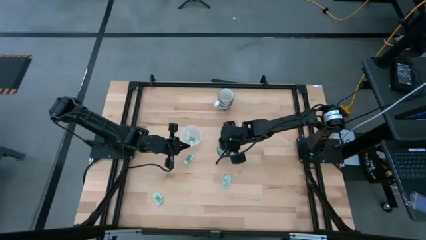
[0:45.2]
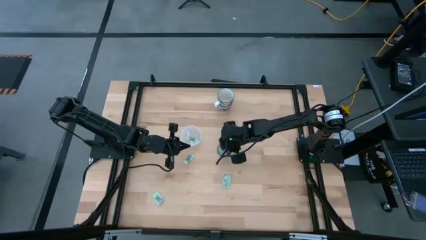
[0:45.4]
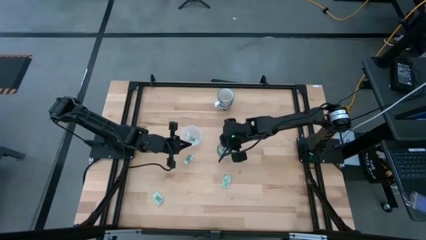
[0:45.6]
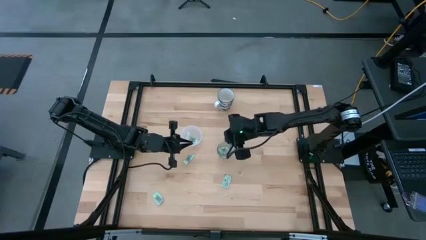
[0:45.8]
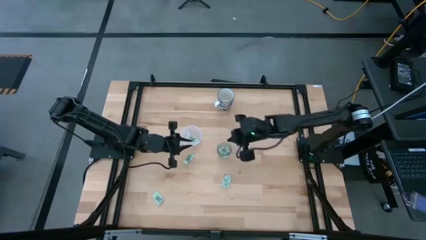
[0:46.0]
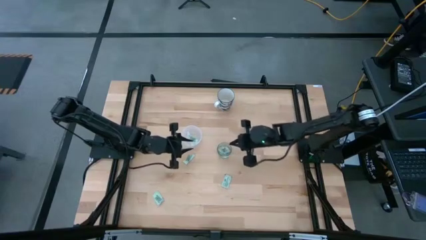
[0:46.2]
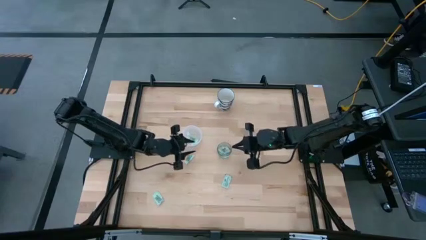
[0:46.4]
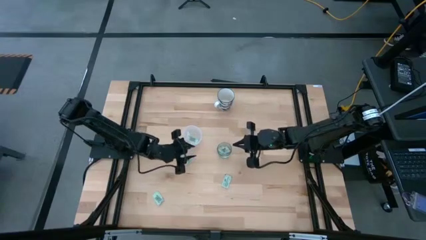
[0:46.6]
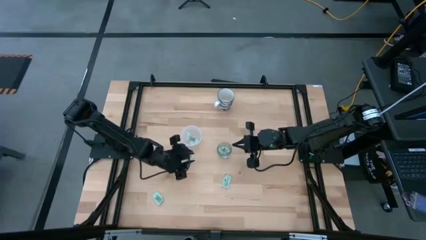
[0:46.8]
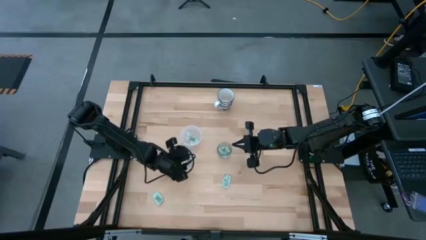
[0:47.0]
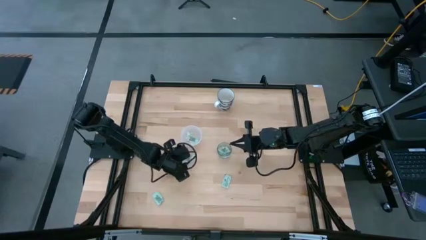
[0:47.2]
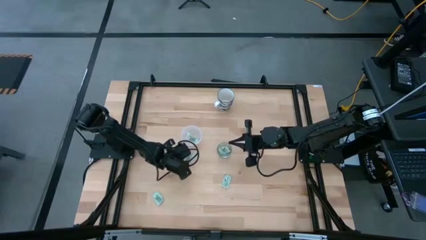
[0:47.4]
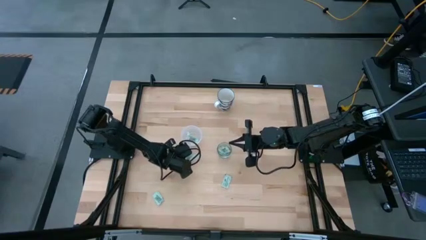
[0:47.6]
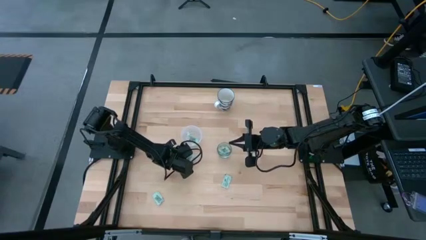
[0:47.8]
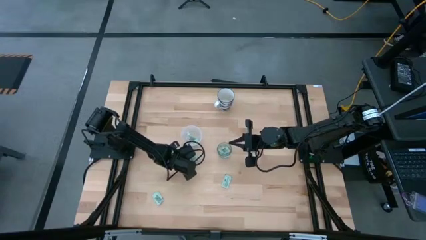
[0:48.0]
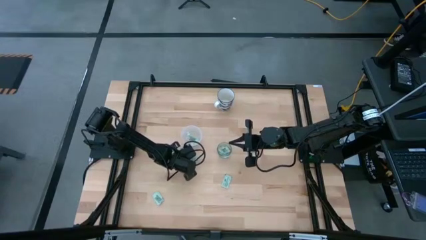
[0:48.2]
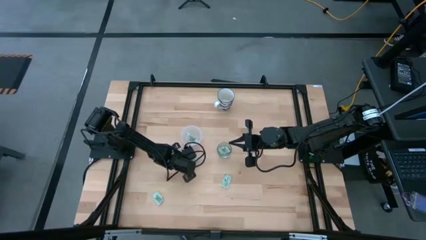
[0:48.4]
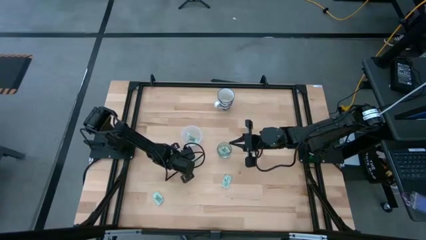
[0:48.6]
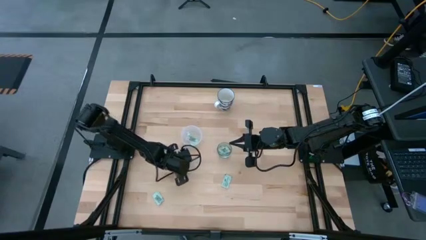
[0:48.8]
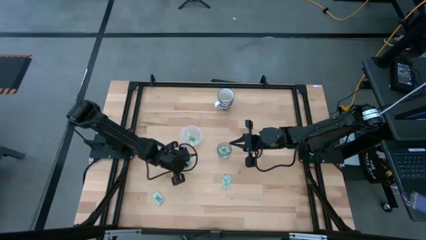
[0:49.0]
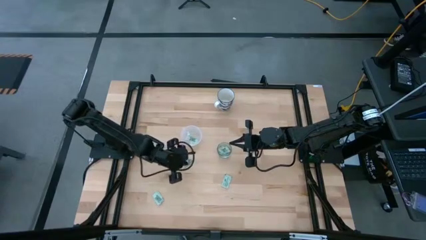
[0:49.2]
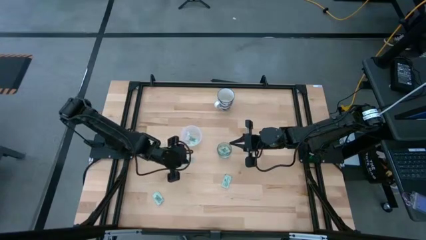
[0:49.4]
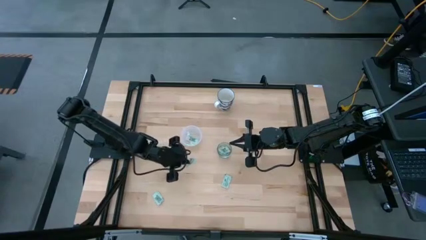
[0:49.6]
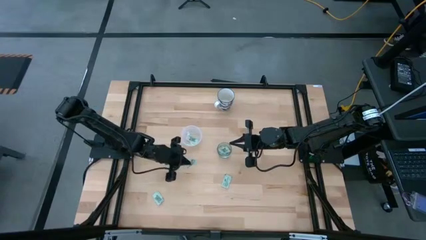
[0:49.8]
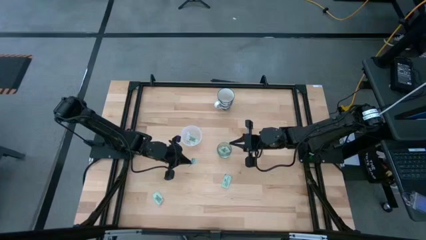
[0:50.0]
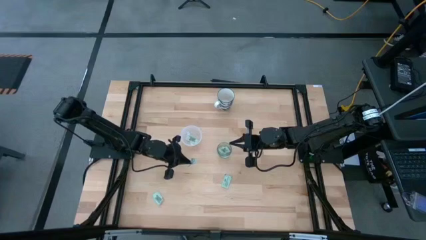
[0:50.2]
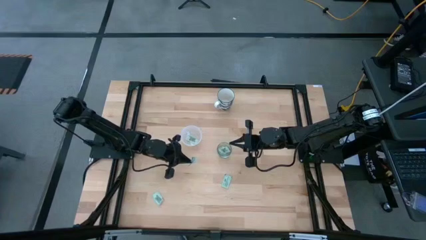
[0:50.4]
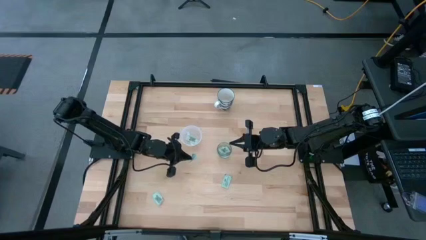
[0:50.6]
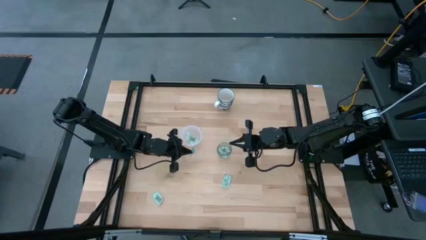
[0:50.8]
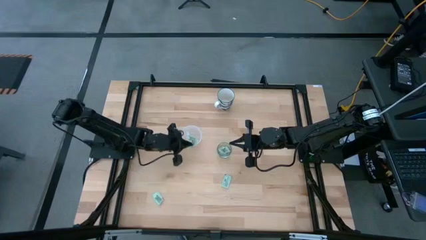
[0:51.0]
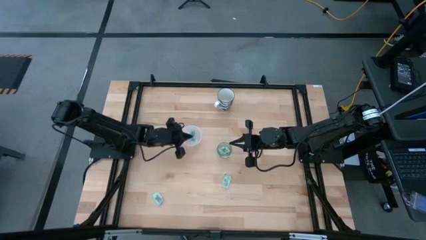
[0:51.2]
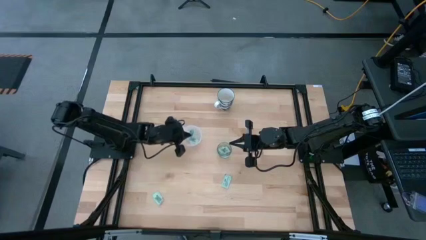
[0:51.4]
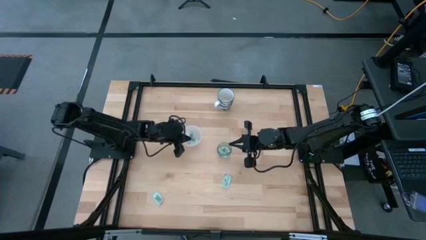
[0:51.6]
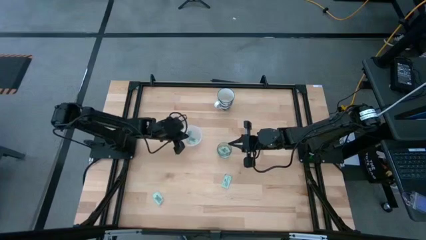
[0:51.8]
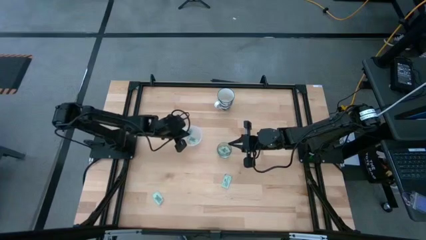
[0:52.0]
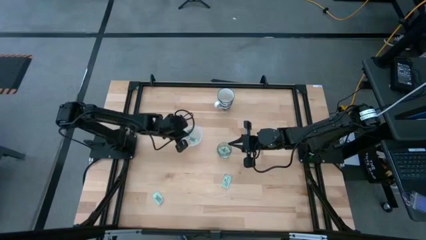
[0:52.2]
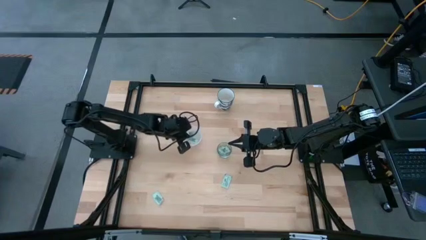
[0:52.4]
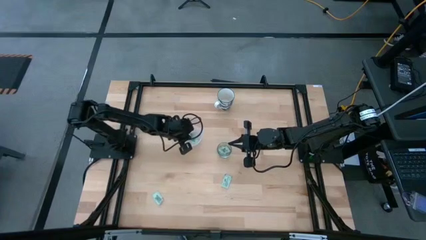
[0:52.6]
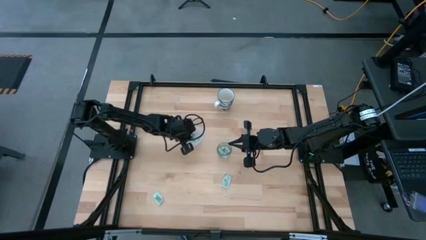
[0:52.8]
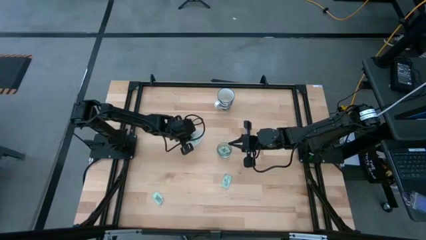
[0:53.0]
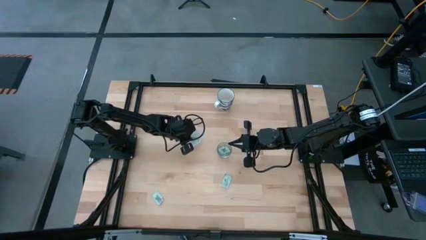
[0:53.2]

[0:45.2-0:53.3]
Task: Pick and place Stevia / Truvia into bins
Put the stevia packet into the plastic container

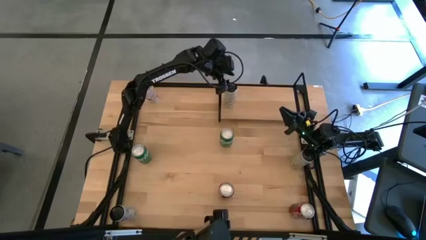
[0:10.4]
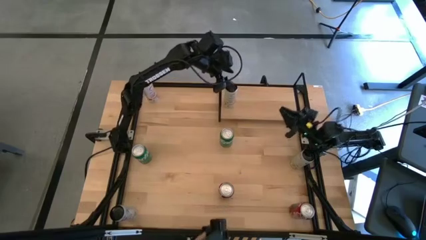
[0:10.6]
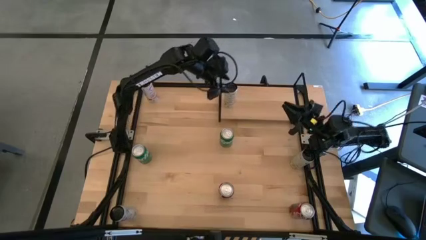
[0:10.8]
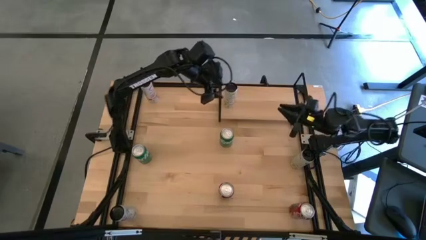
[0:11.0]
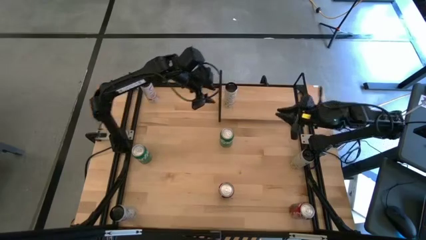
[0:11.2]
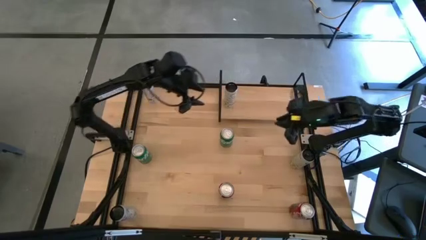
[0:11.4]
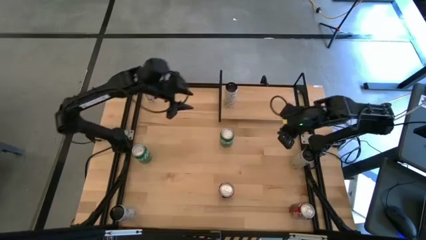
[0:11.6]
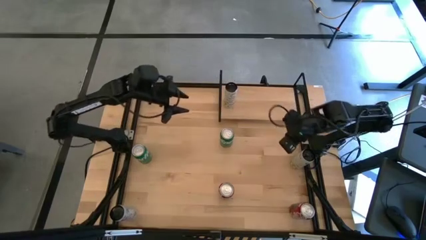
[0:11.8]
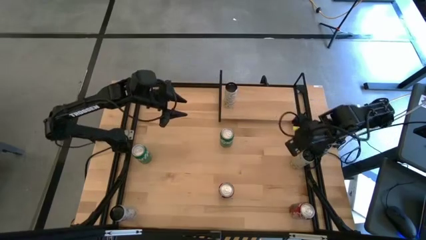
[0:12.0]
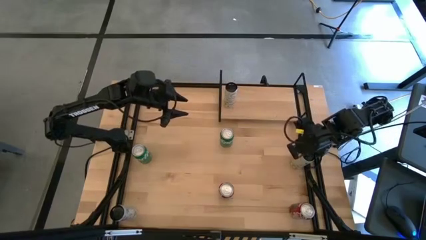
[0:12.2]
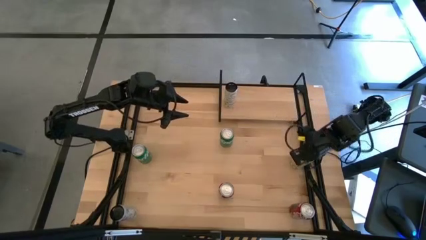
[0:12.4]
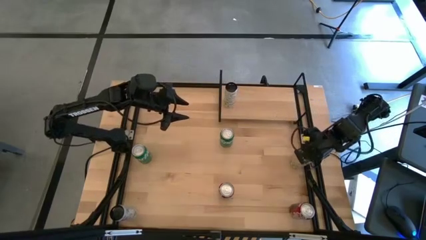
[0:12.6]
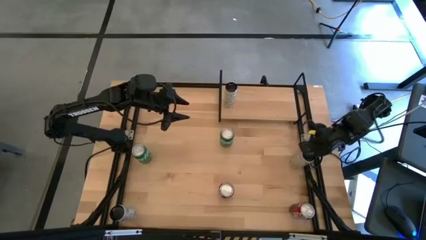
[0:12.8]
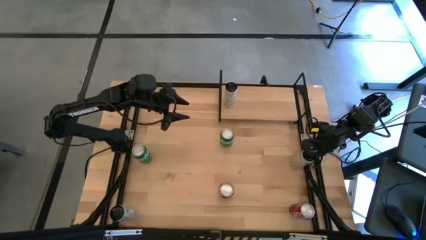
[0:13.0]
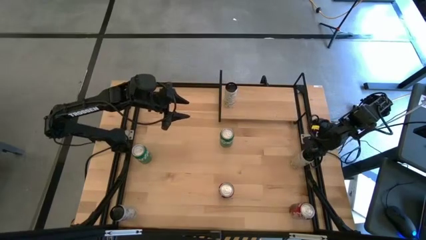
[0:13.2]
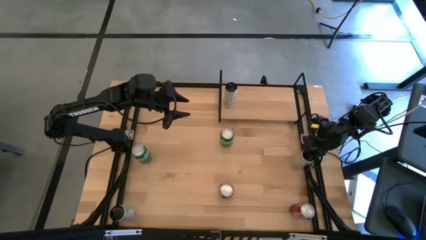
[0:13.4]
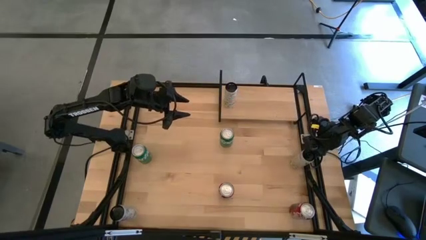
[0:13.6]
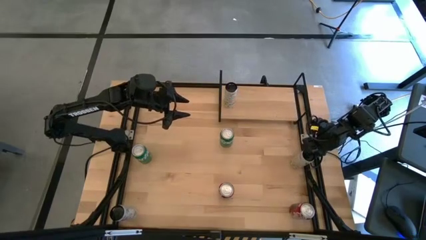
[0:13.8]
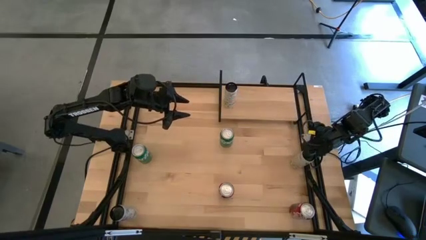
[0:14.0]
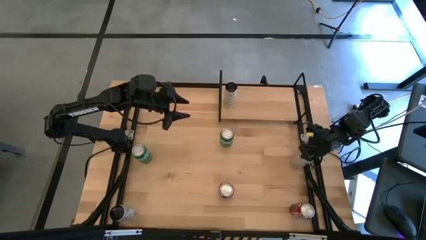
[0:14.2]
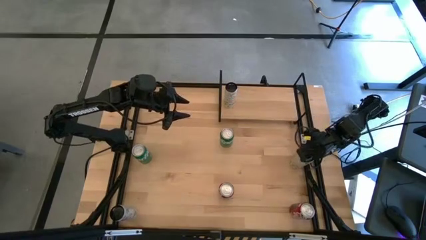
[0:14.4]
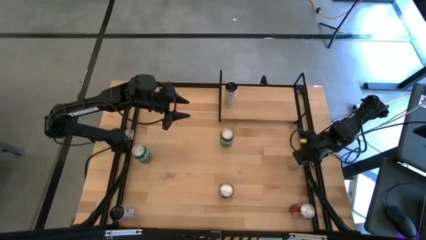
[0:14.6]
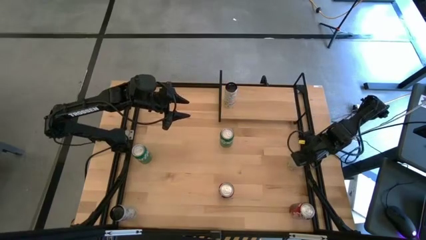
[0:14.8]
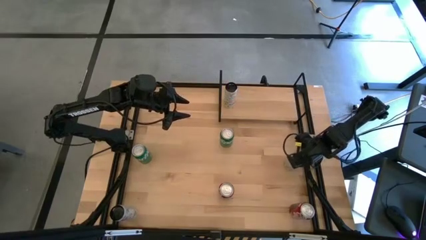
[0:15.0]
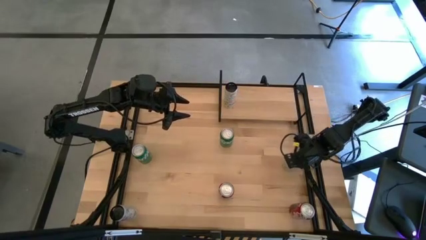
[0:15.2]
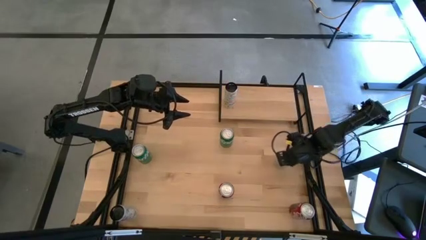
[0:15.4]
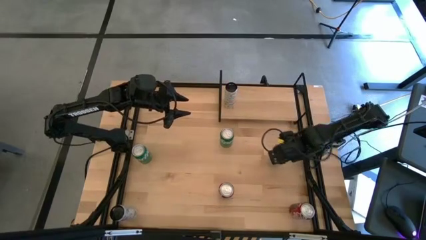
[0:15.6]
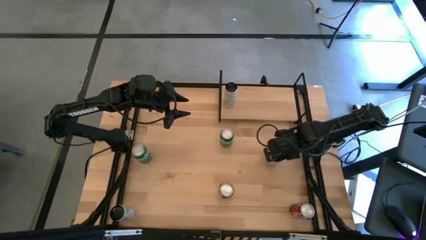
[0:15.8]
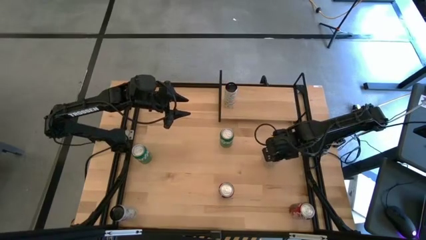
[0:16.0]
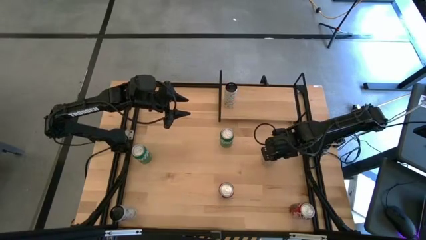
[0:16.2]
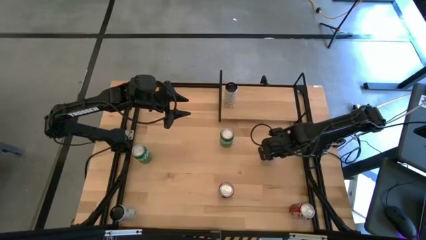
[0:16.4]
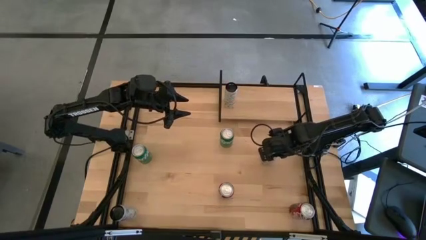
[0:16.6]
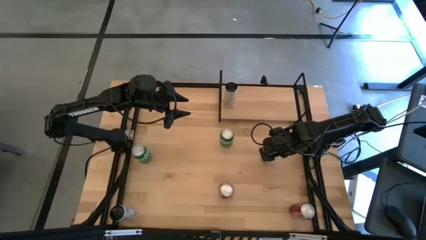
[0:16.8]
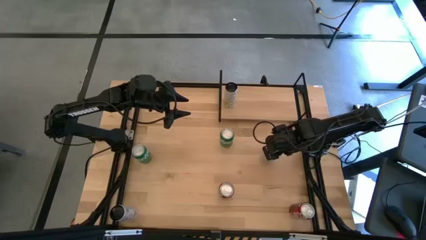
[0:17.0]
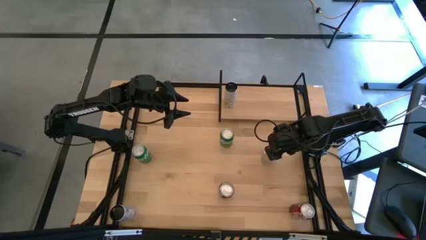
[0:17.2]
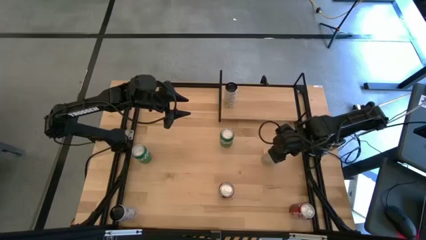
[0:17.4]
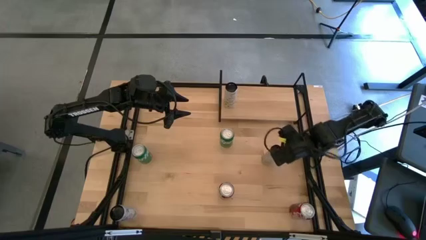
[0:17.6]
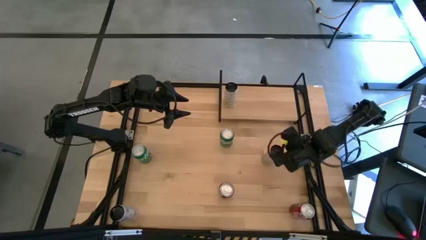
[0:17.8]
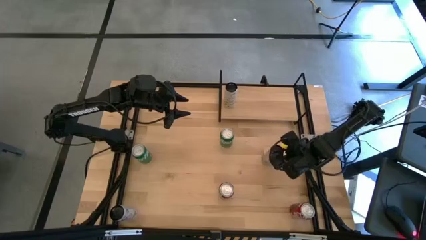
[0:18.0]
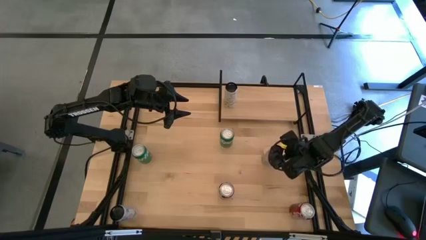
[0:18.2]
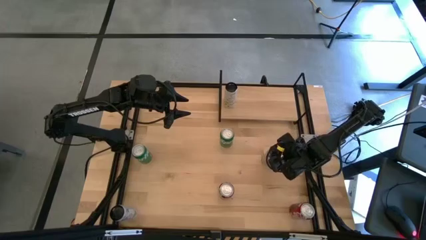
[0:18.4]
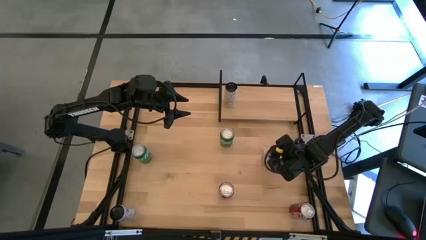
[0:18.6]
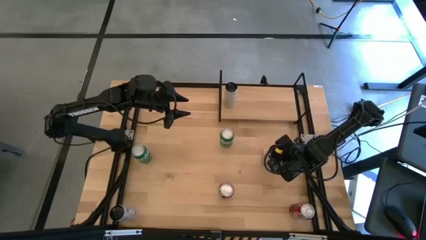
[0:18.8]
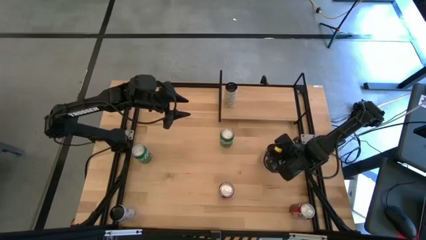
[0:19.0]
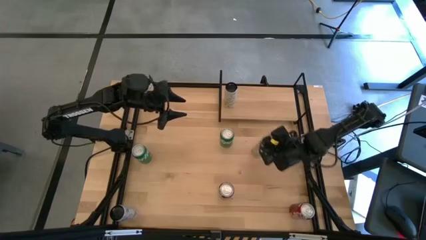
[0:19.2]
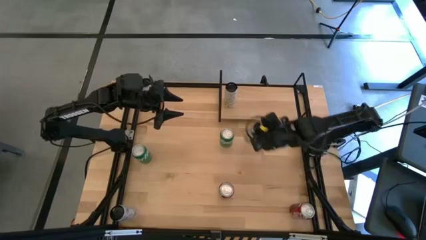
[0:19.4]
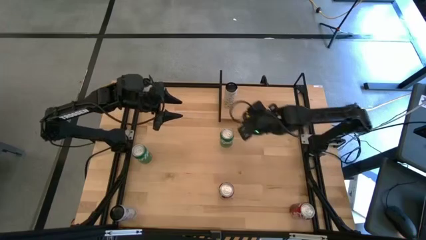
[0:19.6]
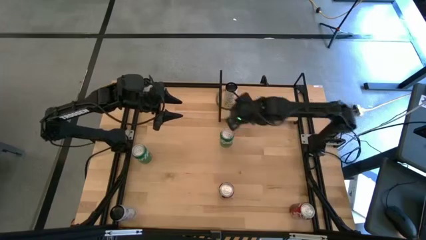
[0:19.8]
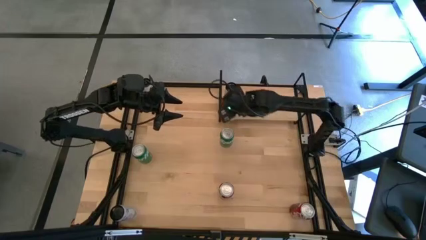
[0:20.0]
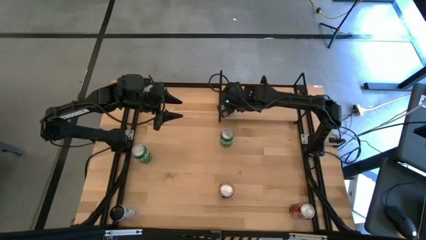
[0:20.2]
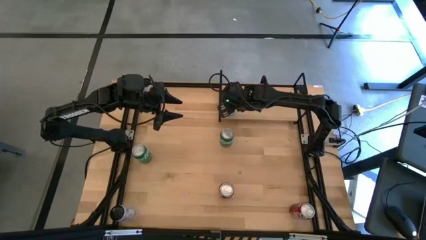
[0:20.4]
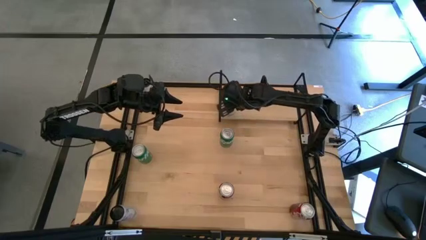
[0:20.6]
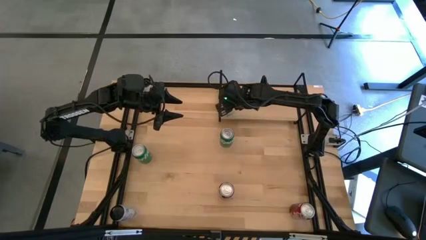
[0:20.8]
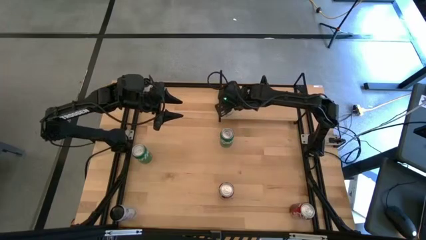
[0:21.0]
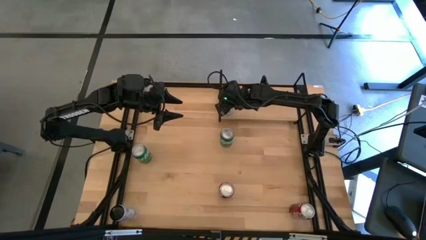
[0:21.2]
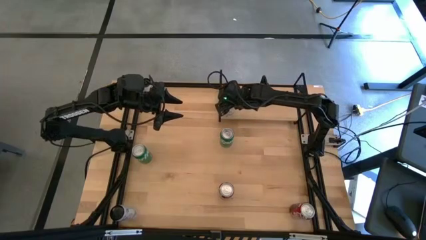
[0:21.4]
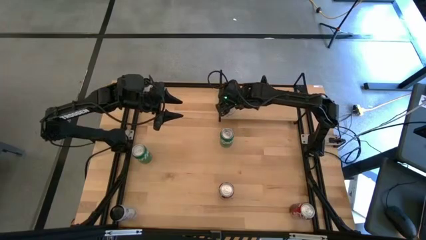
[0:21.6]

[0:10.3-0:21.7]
Task: Place canned beverage on shelf
Put the white-yellow soda can on the shelf aligned with the other white-yellow soda can
